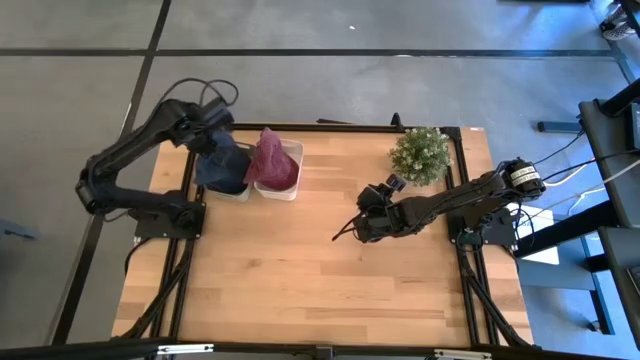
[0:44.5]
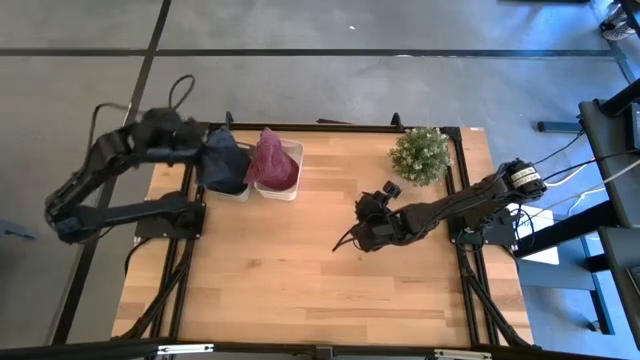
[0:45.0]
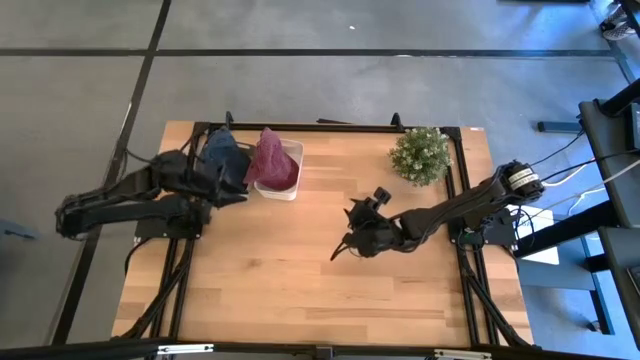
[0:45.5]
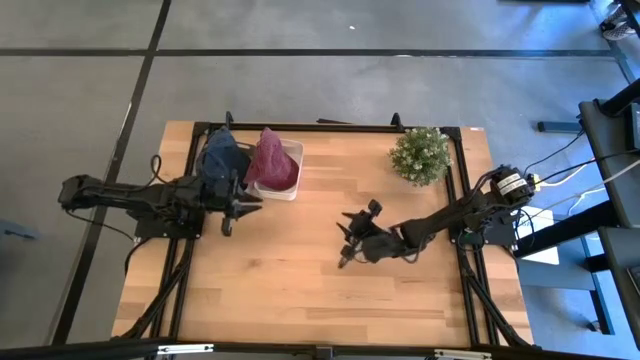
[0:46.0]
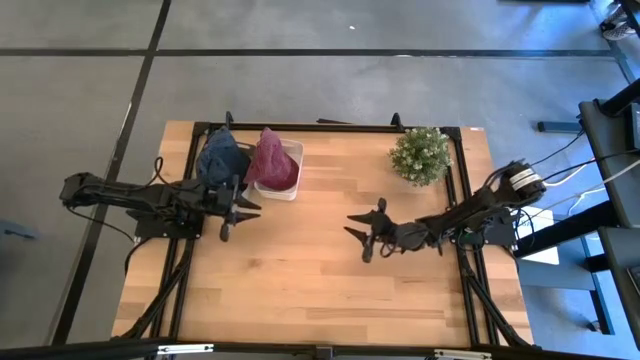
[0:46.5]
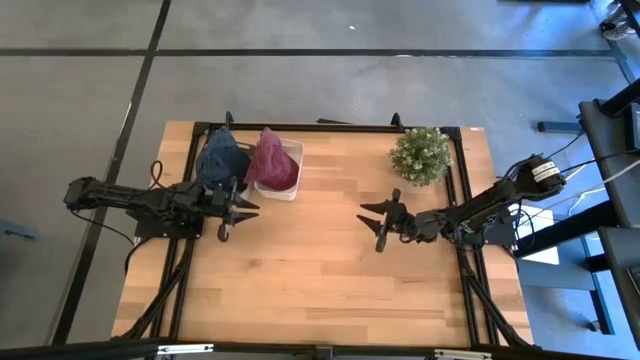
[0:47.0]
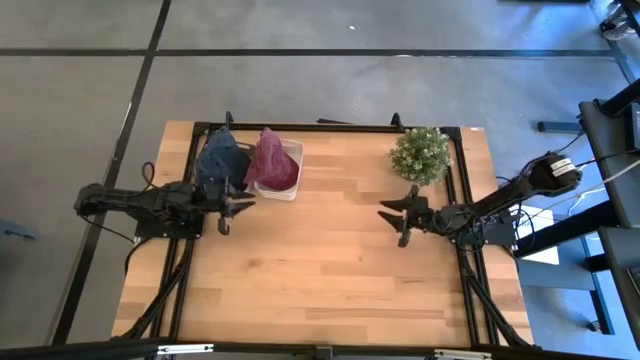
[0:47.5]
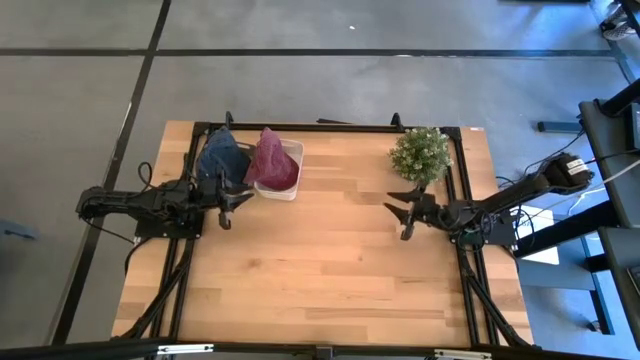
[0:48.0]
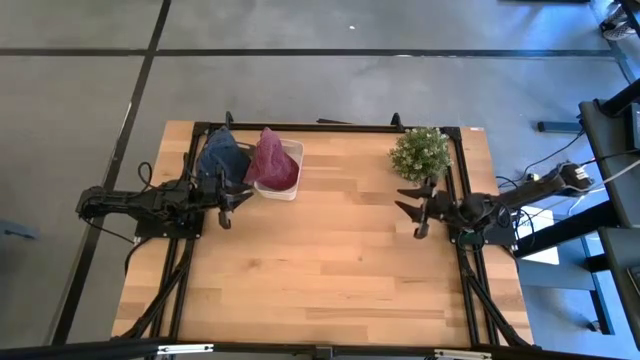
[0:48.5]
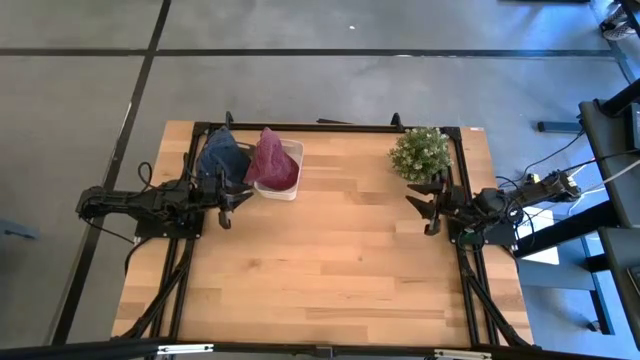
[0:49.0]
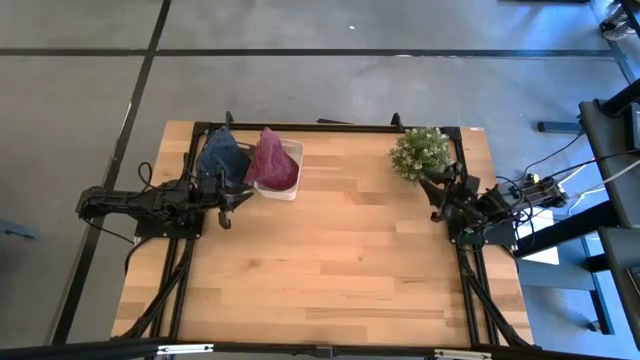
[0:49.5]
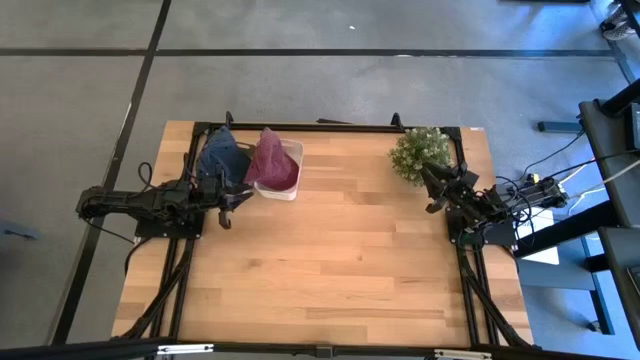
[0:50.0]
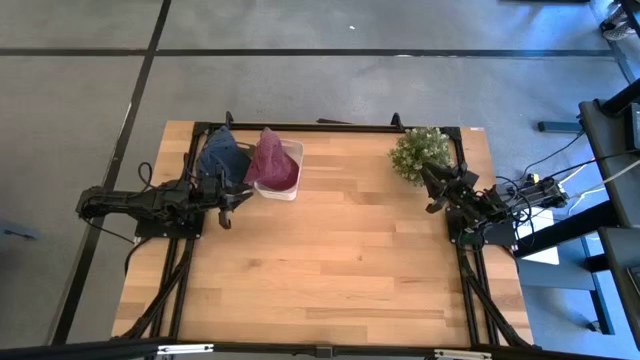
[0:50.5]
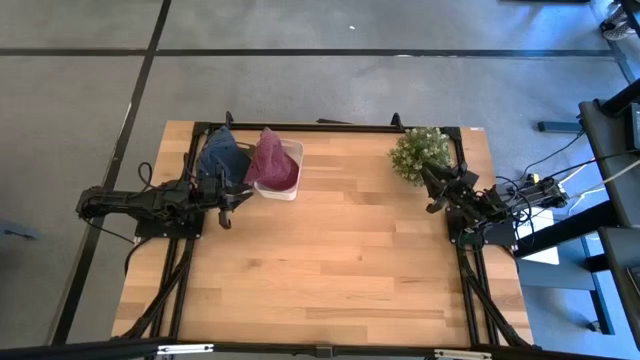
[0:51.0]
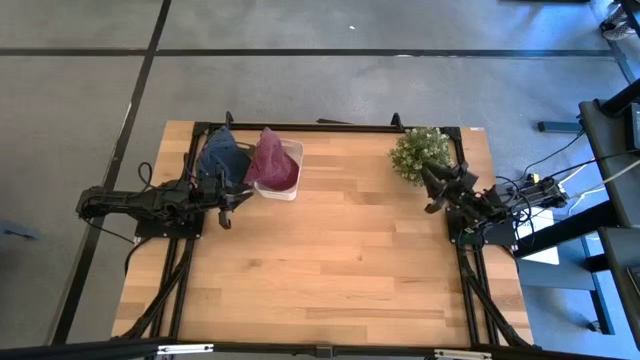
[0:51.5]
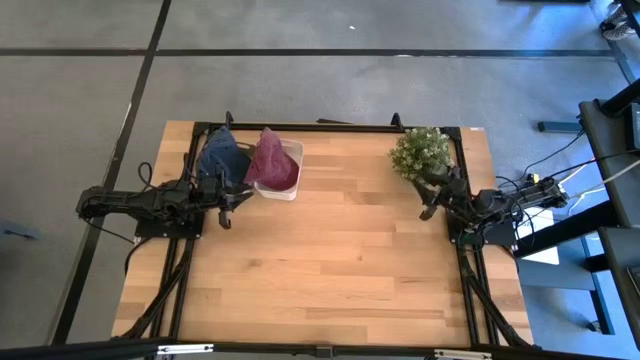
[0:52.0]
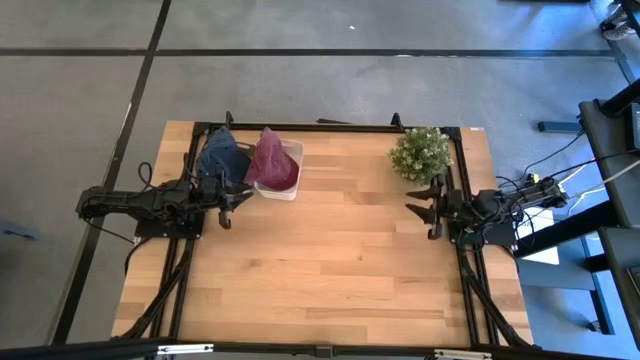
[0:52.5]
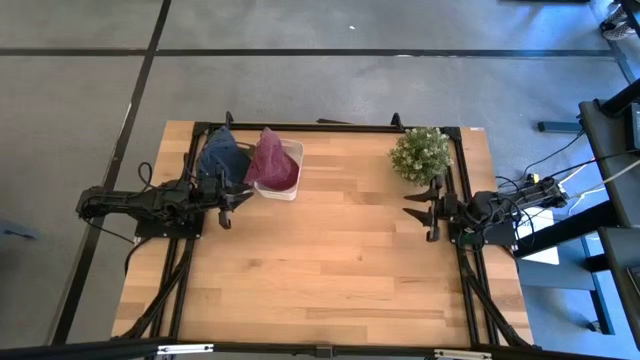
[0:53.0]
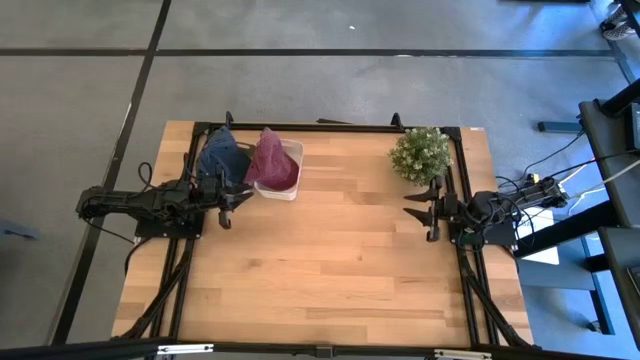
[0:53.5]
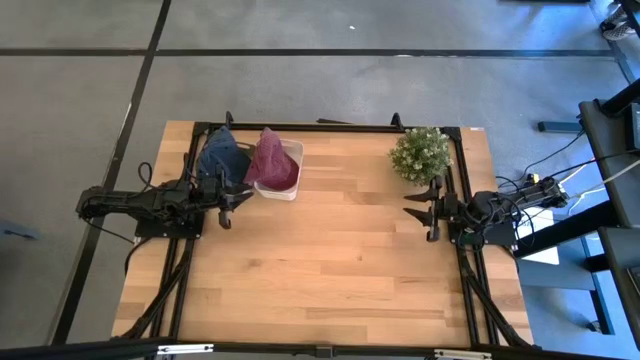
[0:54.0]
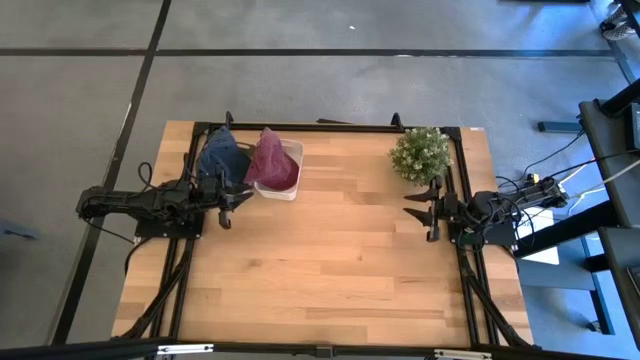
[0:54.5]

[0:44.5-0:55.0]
Task: Pick & Place hat
Return to Home Position

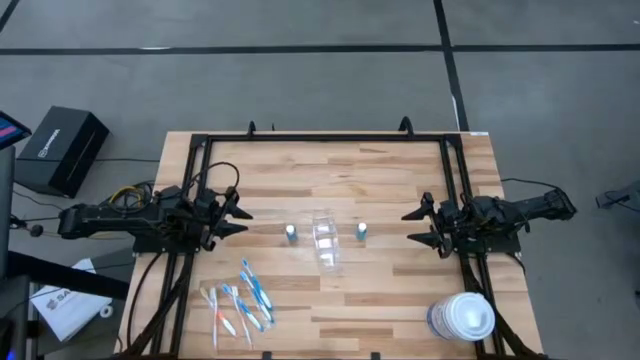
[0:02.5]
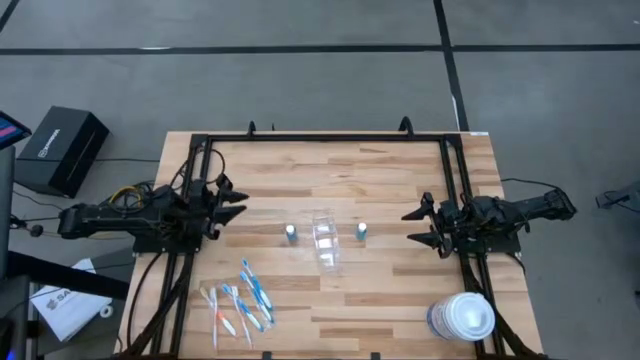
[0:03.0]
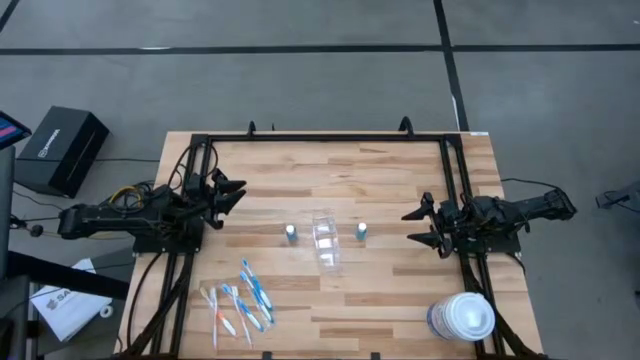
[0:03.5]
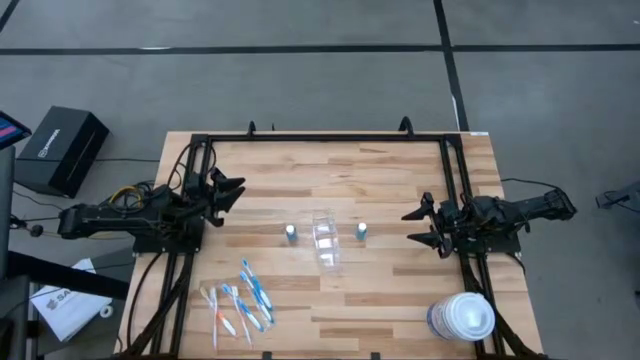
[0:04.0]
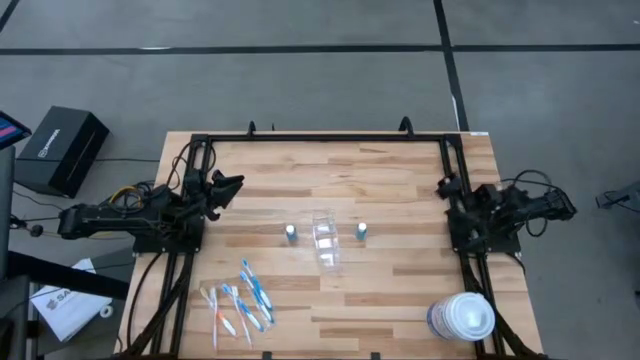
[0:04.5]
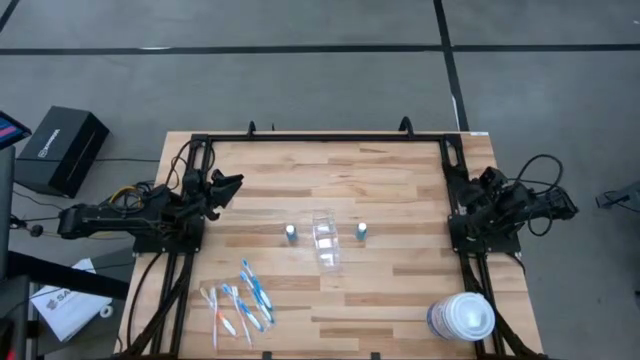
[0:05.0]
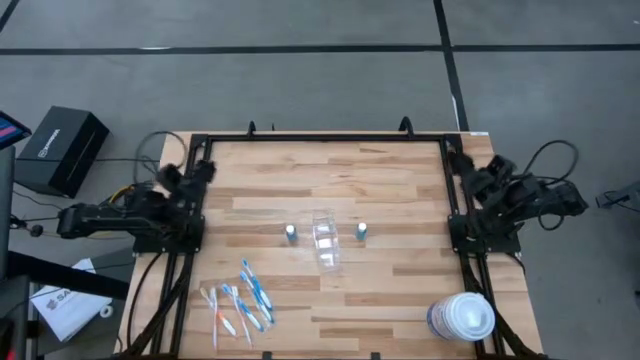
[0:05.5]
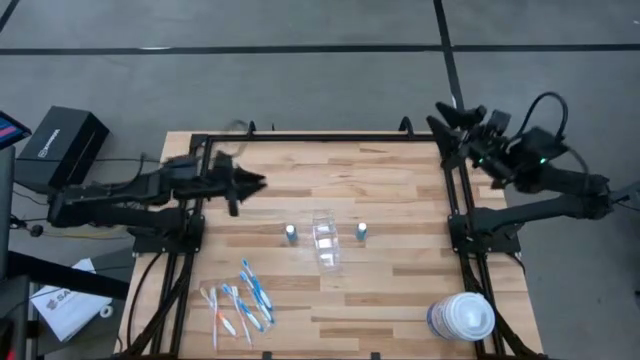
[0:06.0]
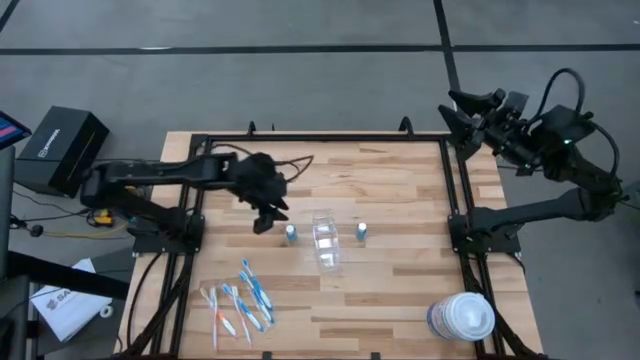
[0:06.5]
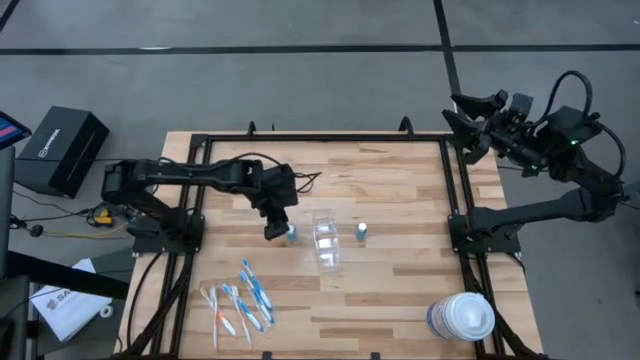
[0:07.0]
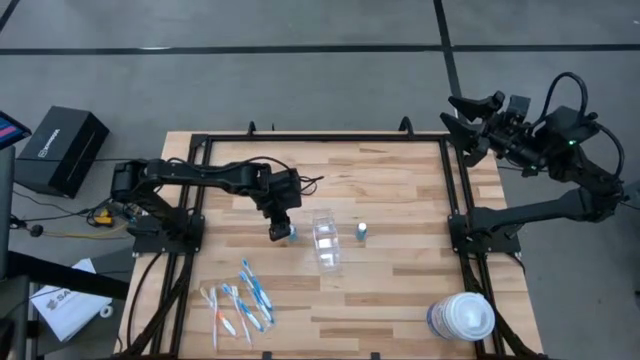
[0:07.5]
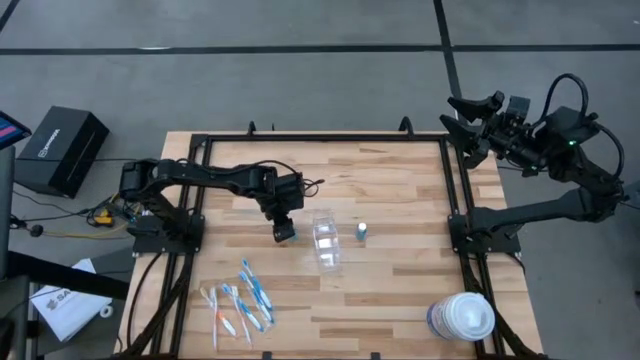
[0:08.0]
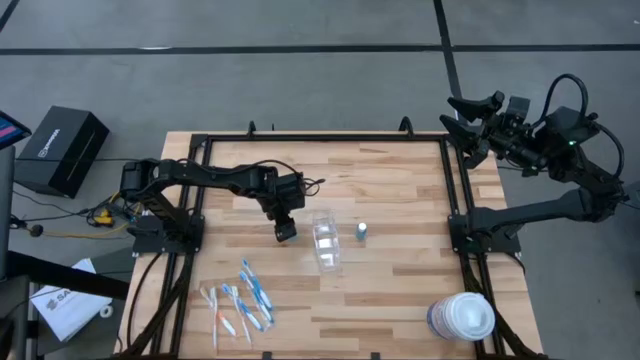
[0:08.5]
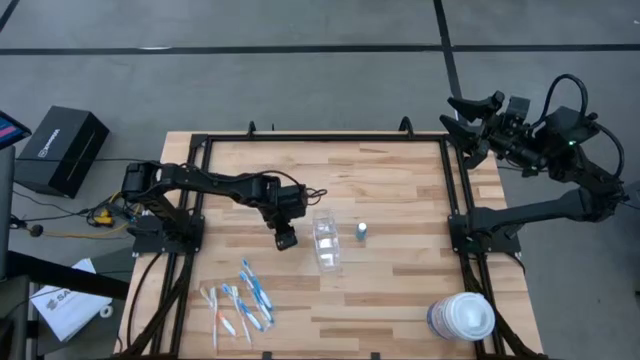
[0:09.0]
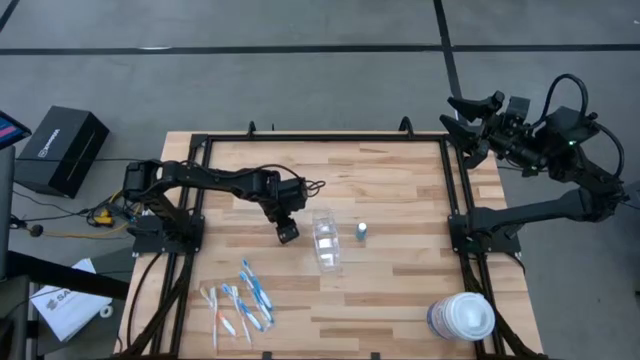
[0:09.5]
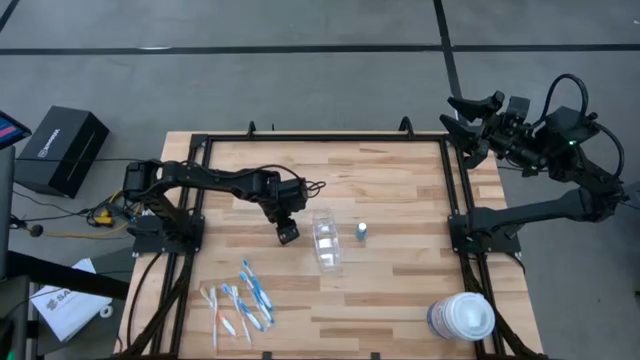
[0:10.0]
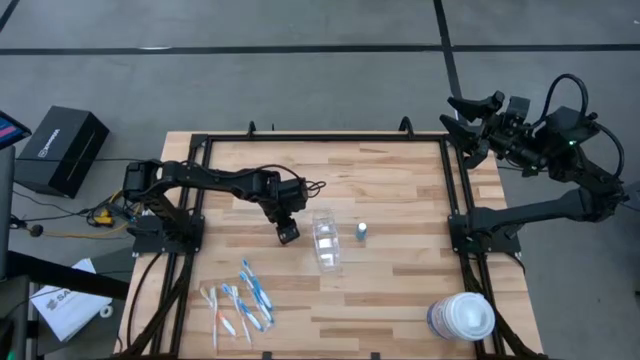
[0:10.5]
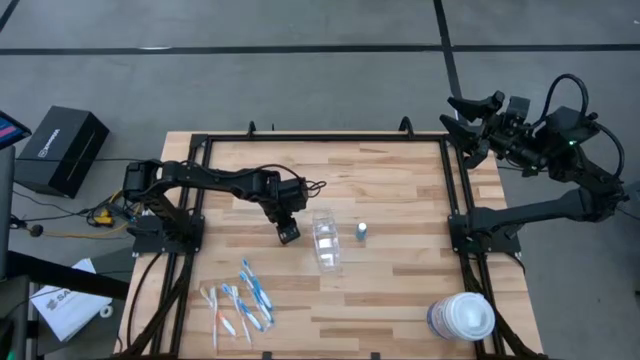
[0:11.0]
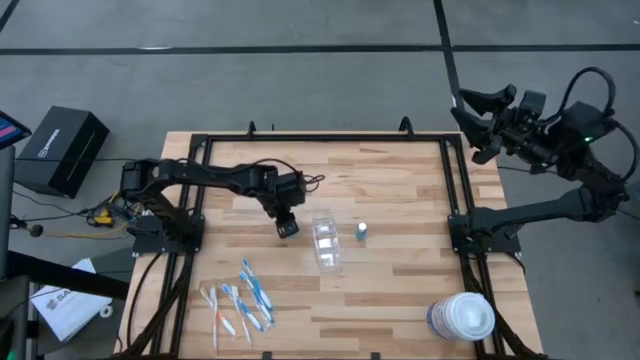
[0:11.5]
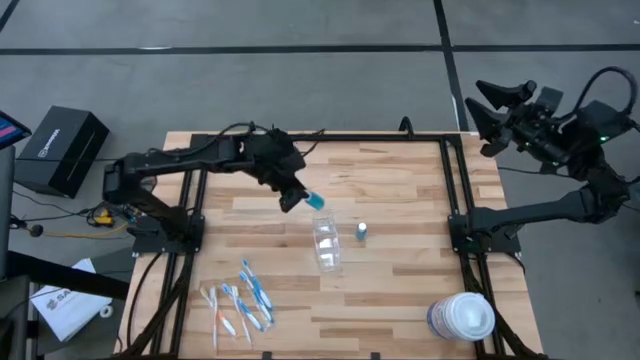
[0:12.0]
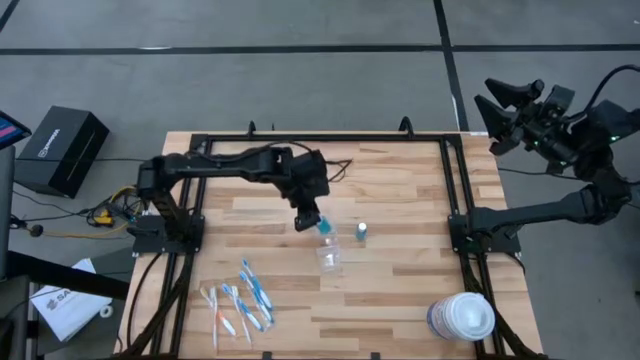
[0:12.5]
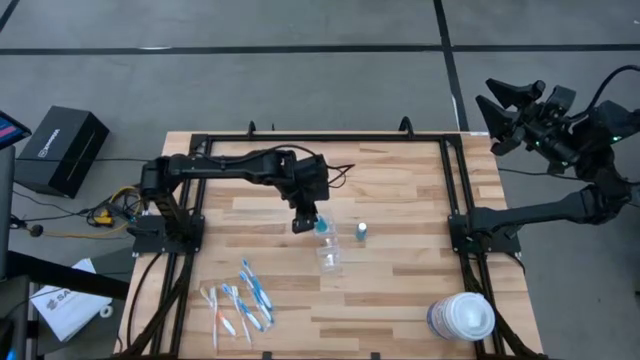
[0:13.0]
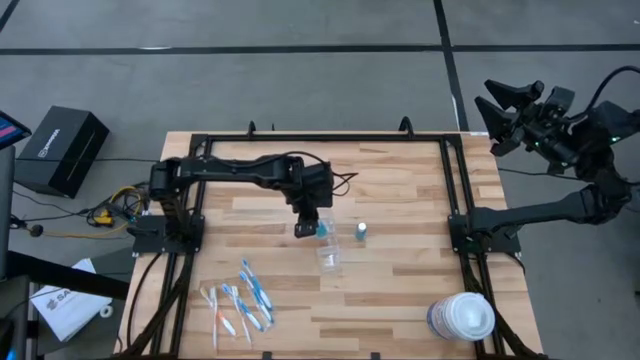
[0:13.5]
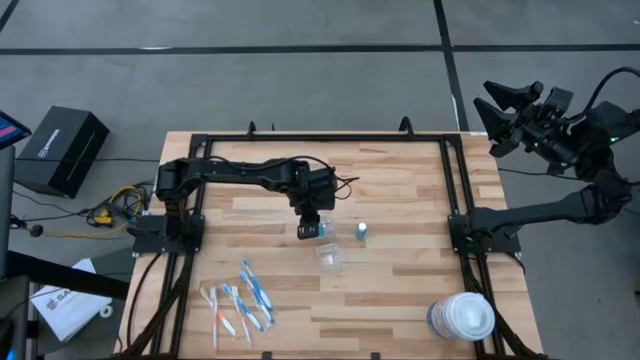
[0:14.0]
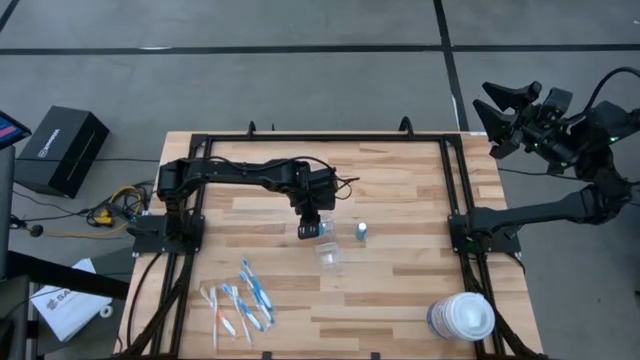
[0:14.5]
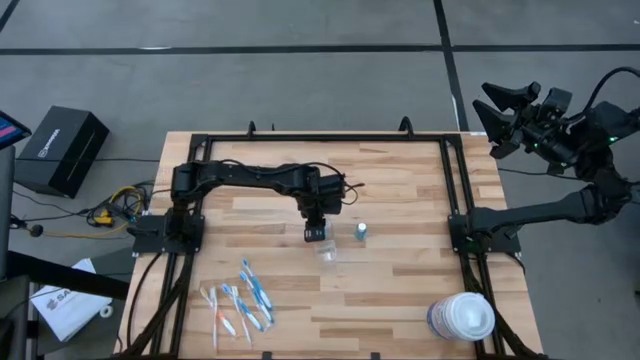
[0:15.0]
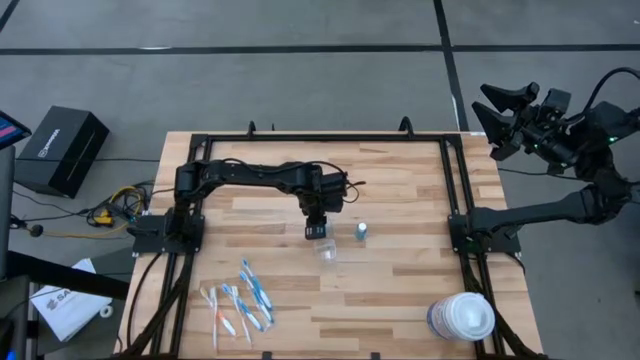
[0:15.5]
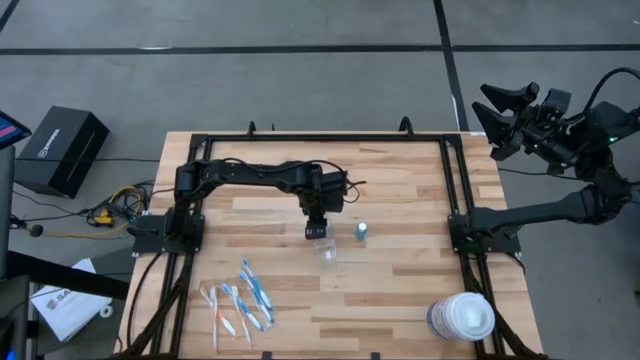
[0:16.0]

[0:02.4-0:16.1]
Task: Pick & Place toothbrushing station
Put the left blue mouthwash bottle into the transparent organizer
